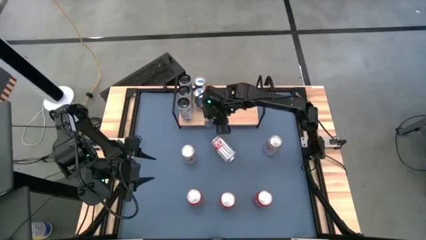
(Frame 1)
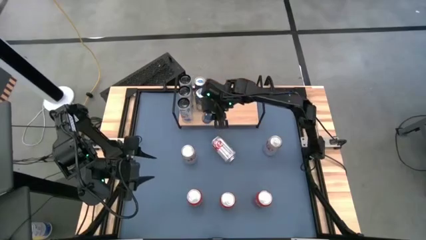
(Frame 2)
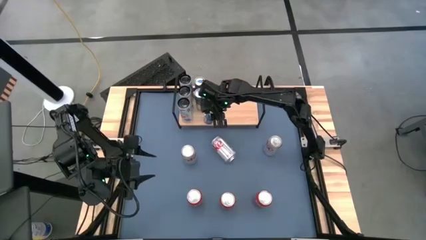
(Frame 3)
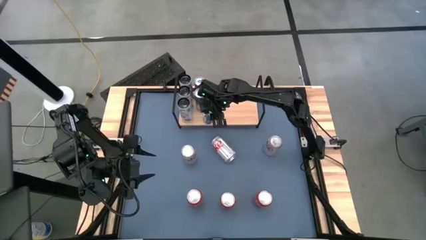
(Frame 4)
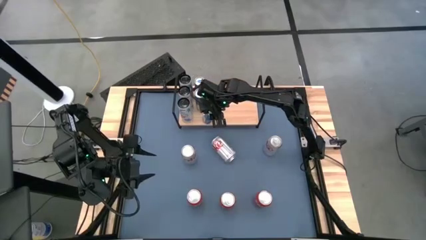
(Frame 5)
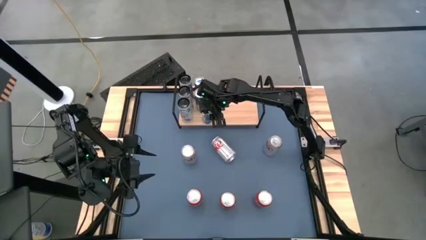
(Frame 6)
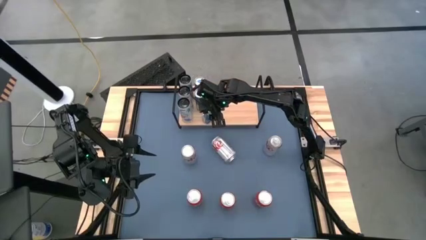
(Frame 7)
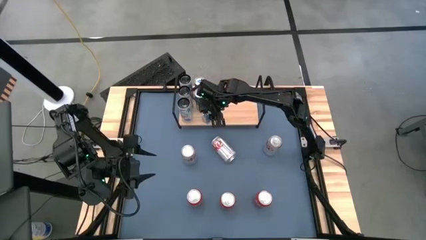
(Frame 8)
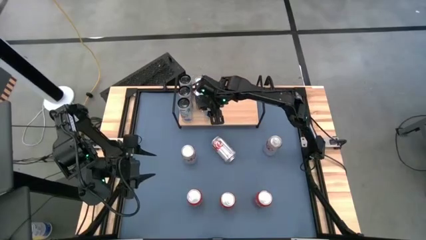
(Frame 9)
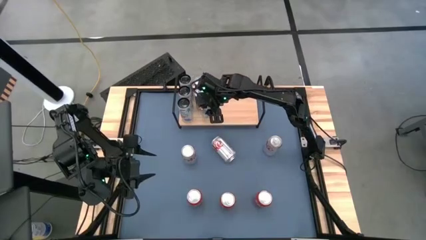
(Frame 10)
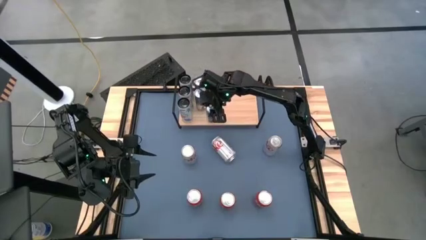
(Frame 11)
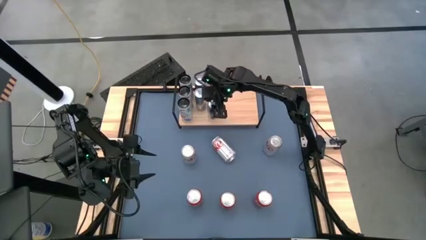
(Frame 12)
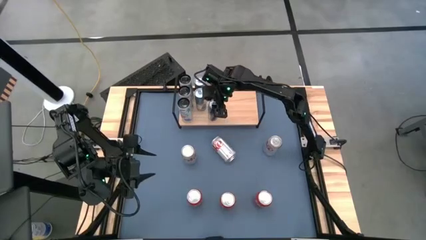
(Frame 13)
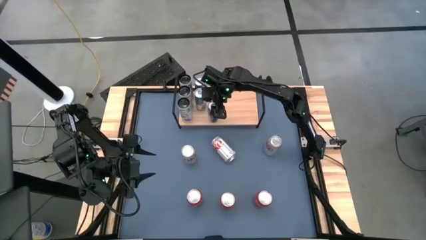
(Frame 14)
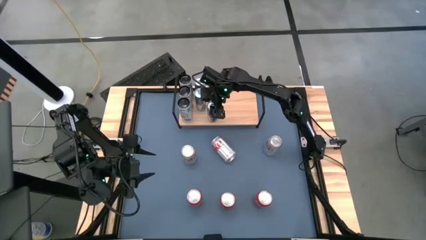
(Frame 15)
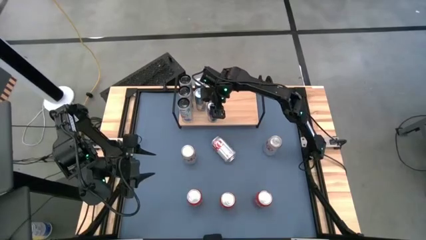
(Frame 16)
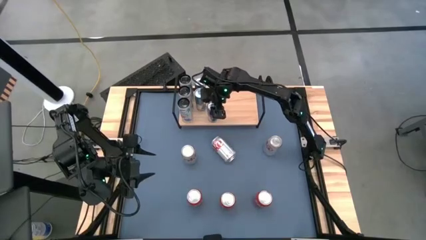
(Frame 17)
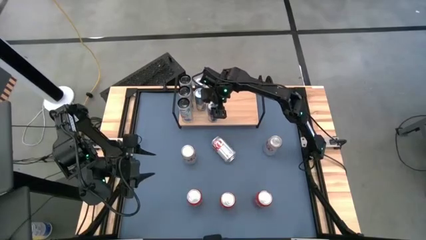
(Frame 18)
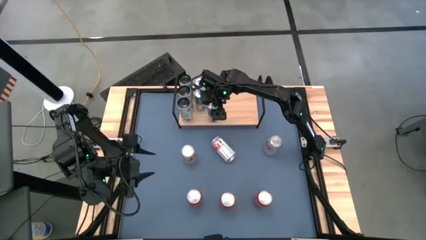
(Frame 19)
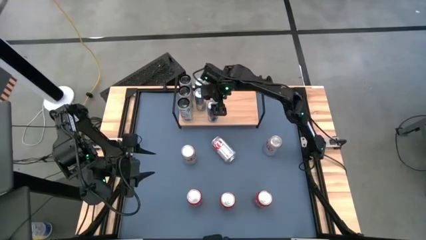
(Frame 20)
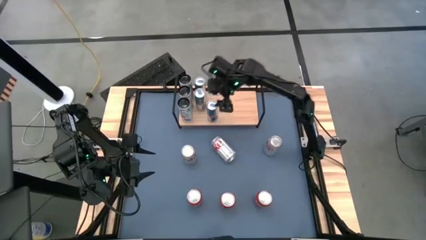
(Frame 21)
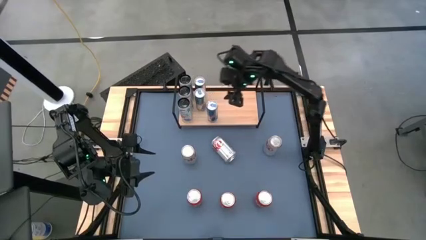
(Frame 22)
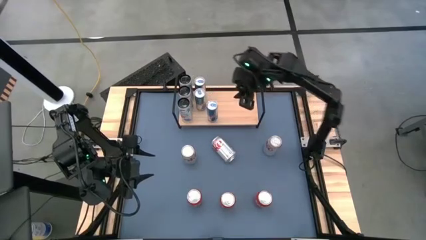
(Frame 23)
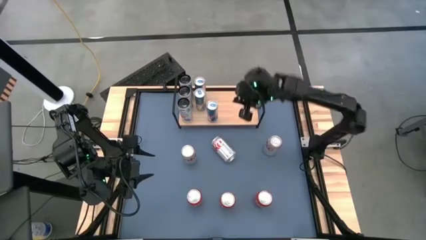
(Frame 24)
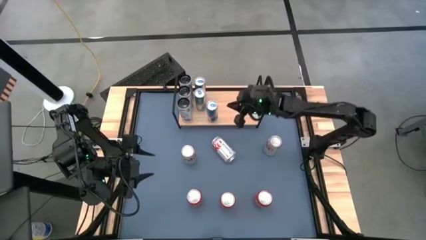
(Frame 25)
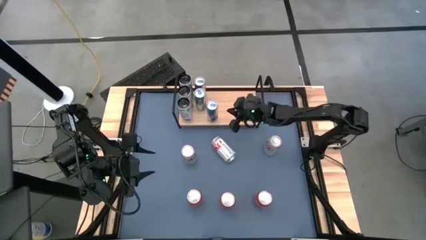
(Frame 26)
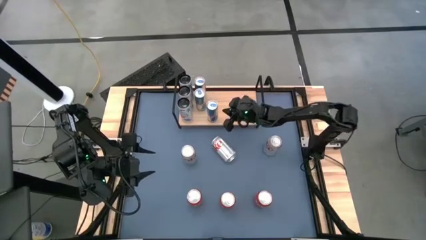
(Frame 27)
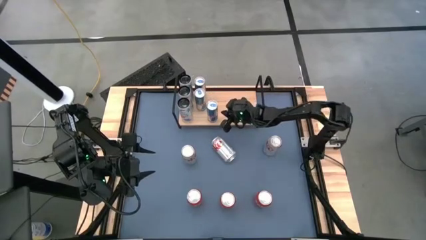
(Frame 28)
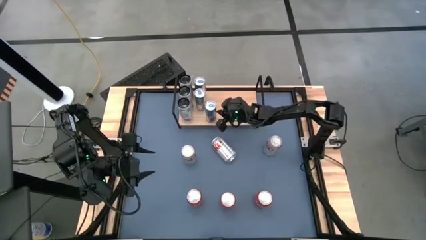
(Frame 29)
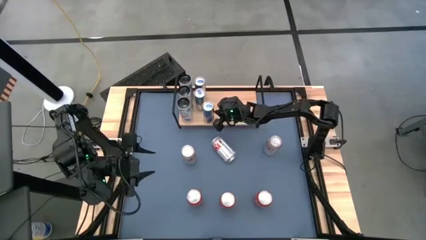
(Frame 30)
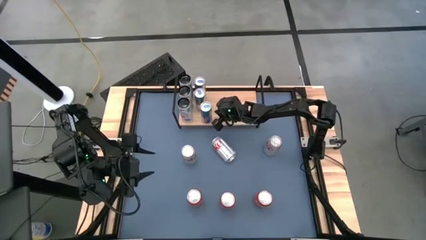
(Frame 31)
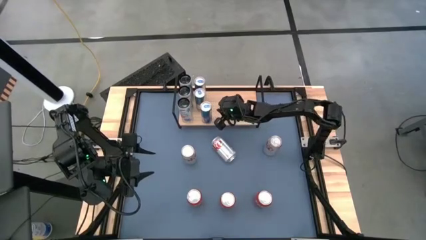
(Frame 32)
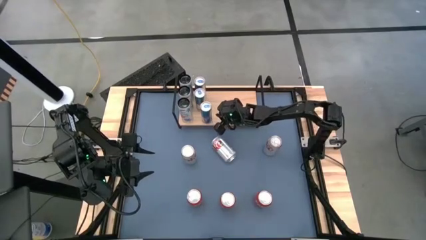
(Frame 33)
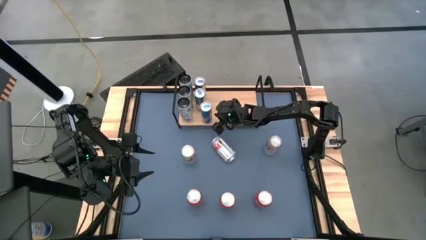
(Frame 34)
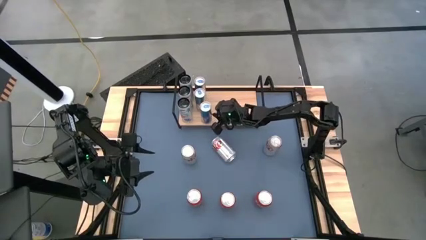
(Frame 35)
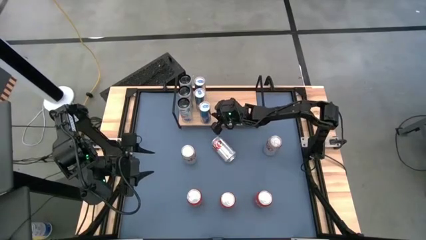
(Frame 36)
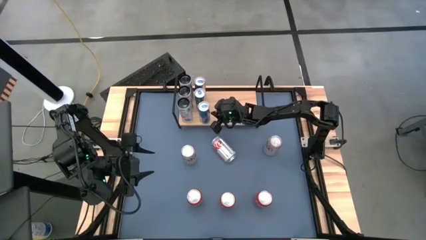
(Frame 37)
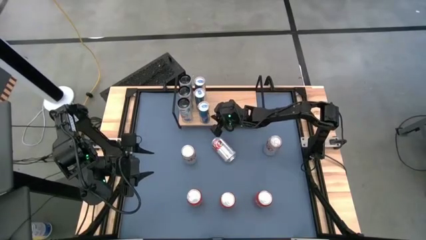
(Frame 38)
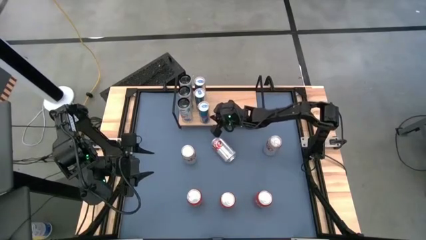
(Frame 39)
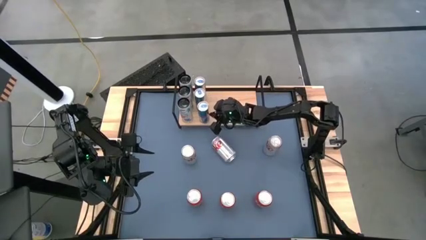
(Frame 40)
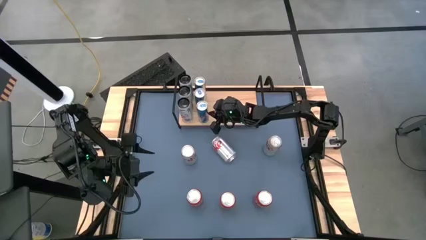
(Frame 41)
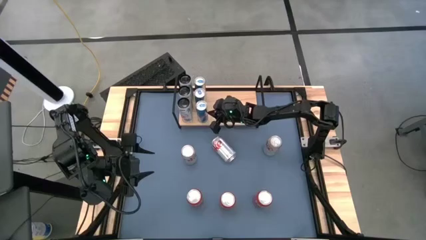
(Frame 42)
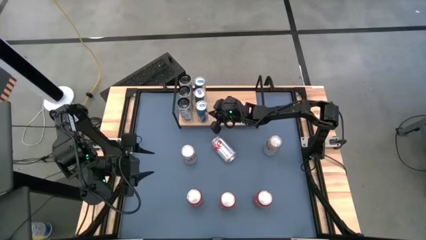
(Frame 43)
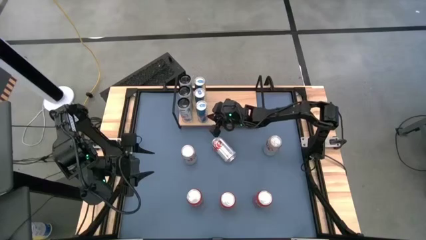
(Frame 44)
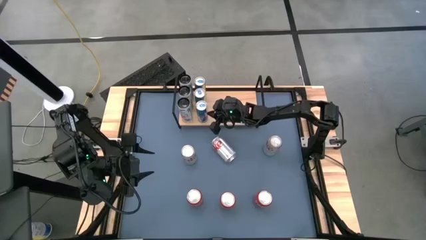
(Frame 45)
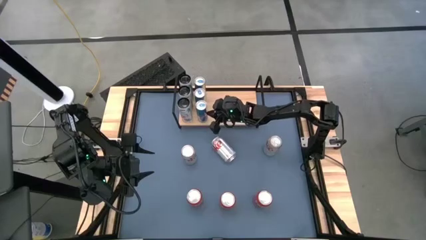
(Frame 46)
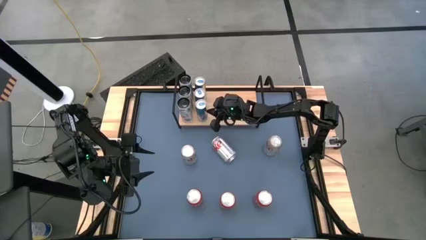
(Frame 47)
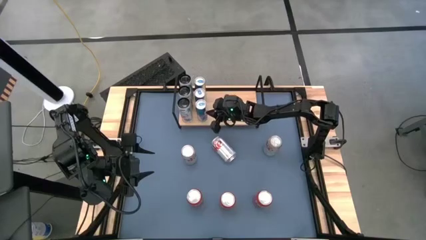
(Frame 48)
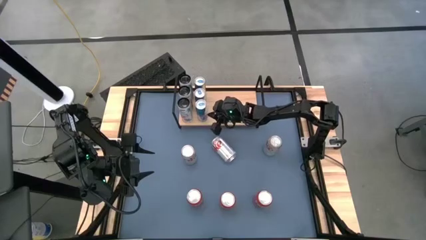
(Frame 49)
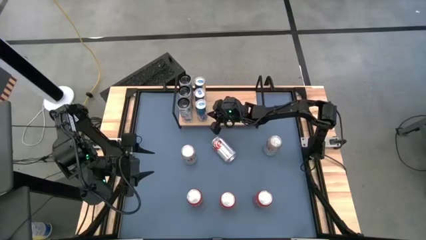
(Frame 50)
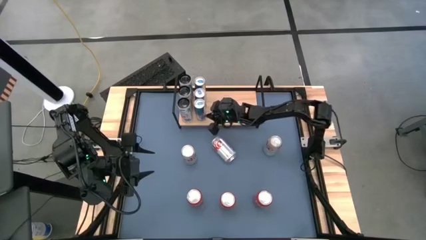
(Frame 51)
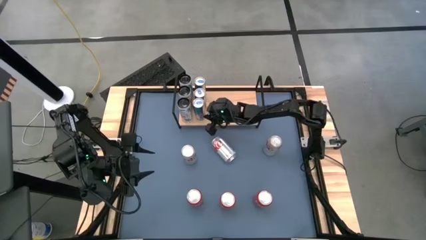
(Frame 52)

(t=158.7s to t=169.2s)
Task: Place canned beverage on shelf
Put the blue soda can aligned with the other blue soda cans on the shelf

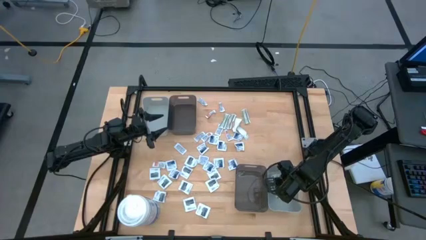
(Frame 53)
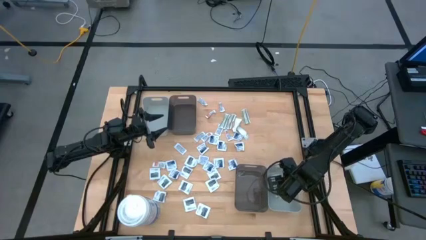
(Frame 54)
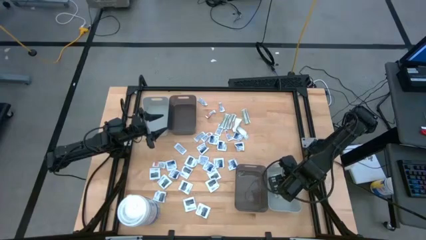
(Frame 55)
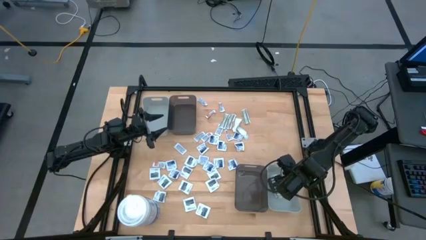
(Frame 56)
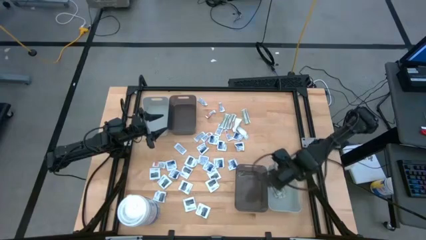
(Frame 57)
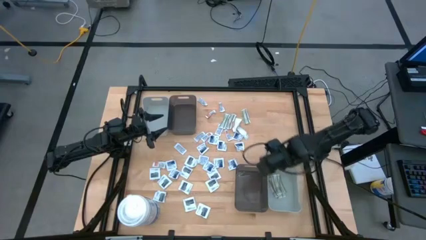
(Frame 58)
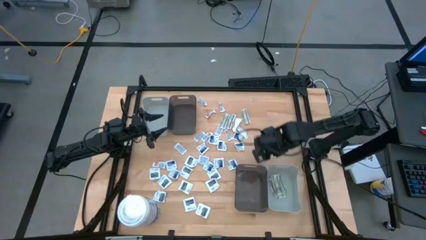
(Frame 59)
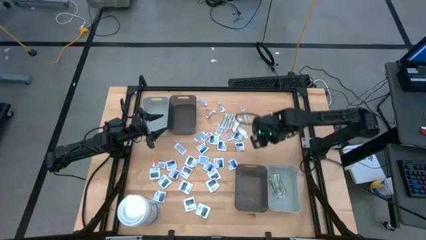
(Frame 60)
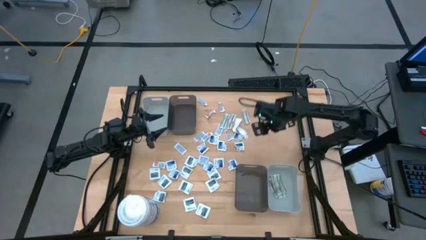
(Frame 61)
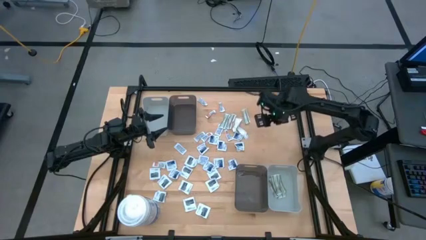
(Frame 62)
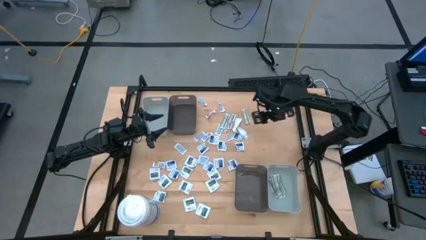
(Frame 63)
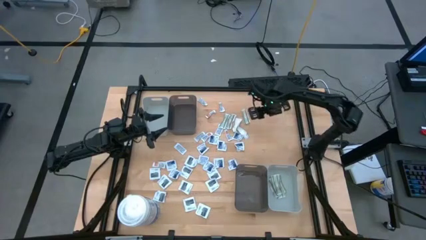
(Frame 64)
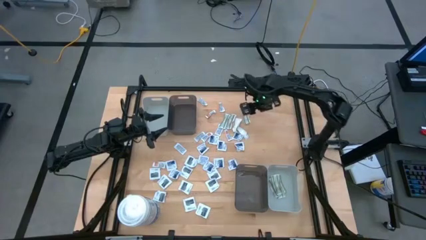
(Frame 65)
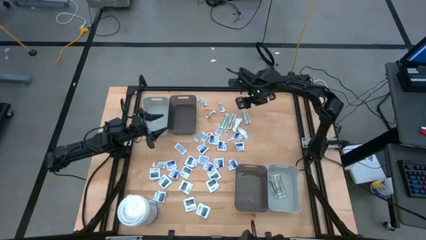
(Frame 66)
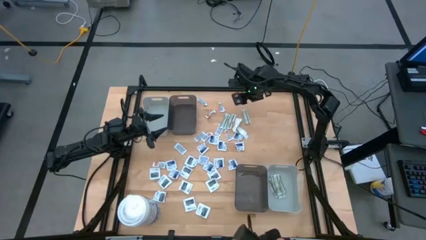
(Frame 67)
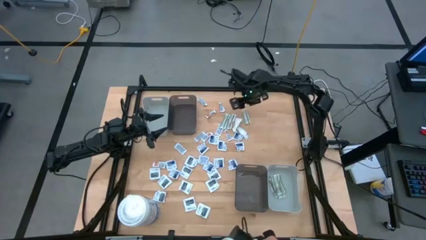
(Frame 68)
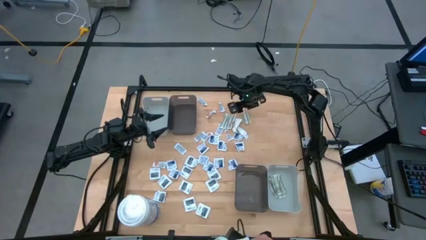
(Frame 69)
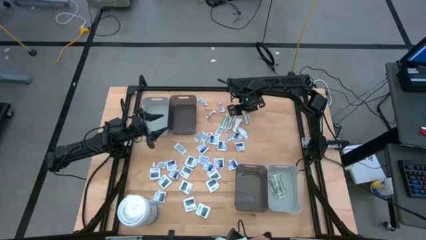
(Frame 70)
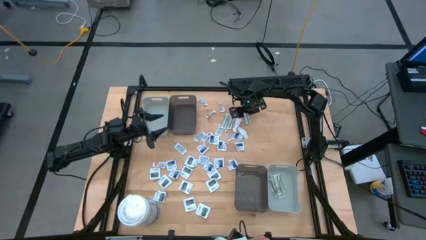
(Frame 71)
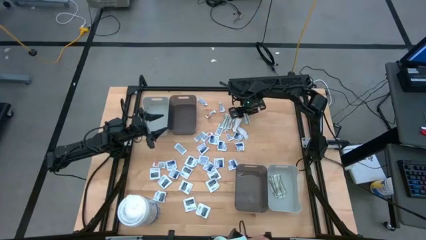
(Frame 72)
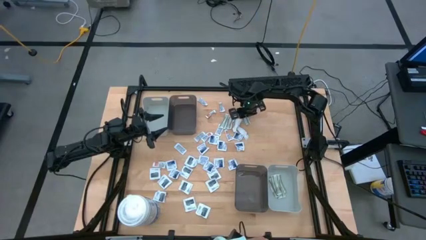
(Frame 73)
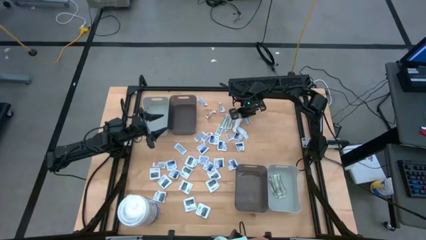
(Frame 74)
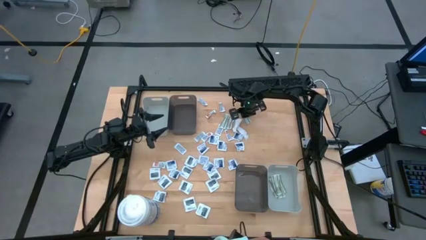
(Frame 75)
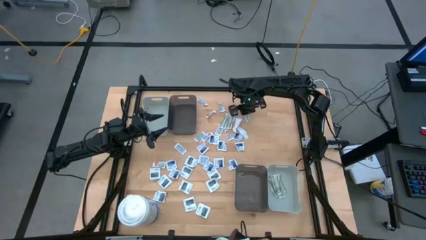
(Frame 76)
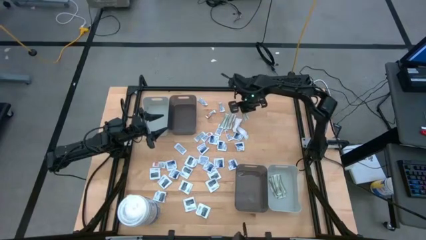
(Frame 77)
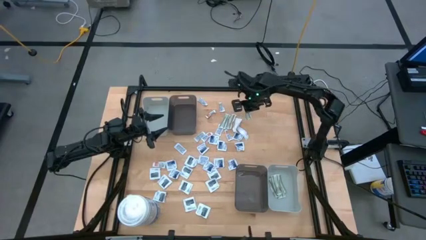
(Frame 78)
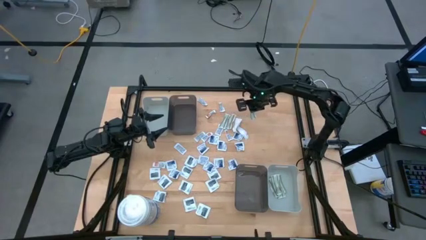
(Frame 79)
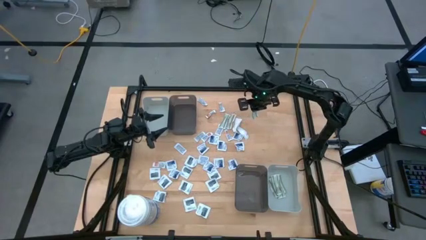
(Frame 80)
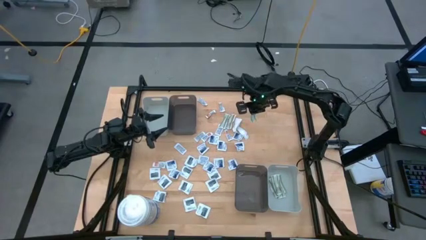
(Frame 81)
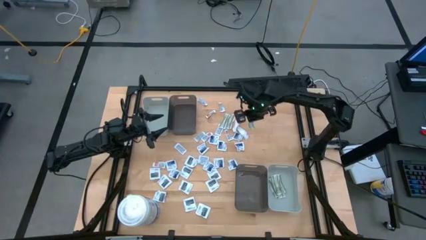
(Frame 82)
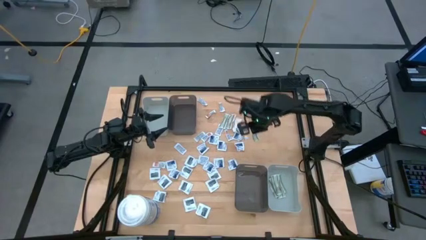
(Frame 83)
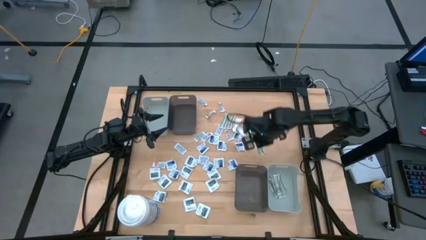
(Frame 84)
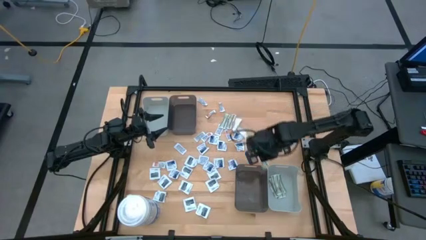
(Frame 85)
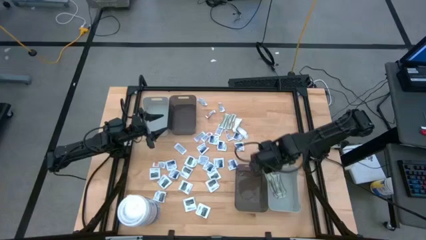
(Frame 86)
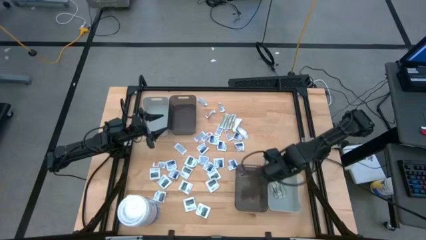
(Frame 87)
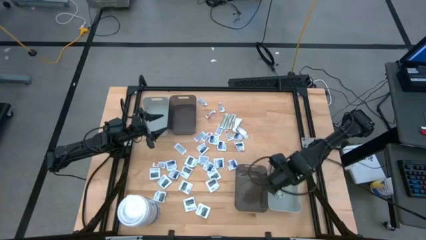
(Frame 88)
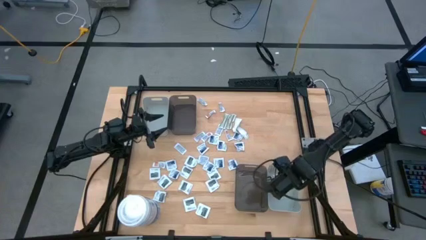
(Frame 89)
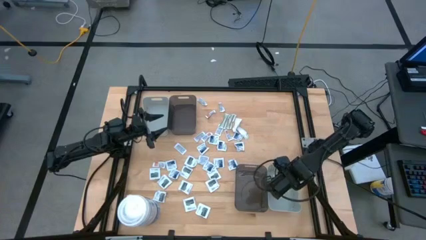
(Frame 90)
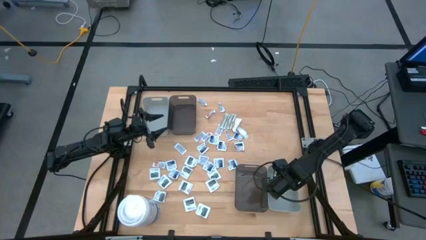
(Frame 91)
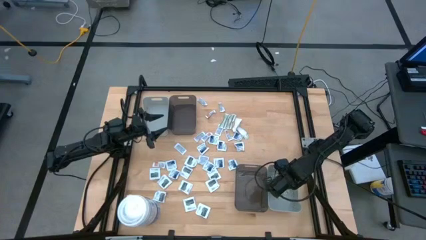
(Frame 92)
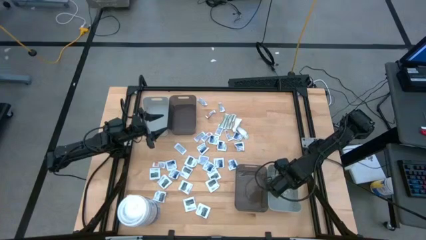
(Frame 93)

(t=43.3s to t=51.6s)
Task: Pick & Place First Aid Supplies
Put the white bandage pack into the bottom gray bin
